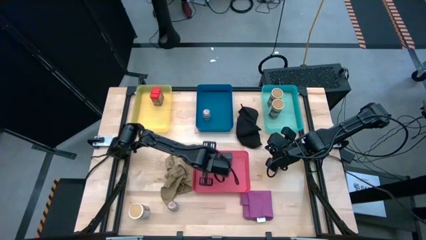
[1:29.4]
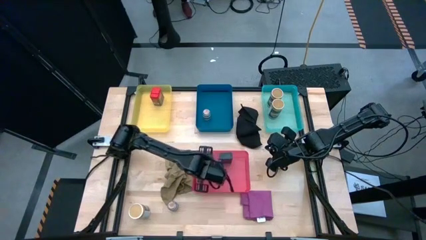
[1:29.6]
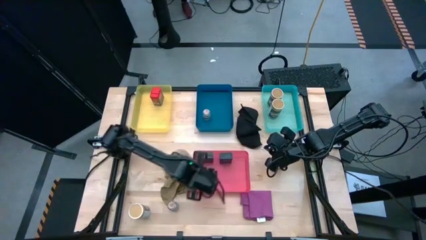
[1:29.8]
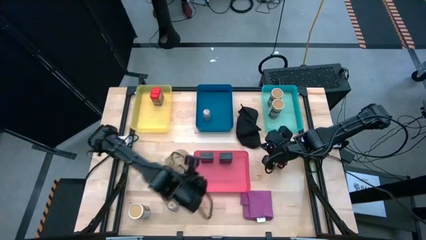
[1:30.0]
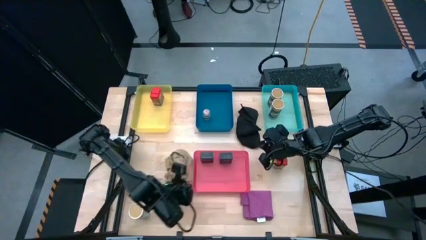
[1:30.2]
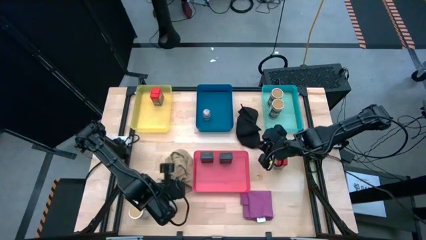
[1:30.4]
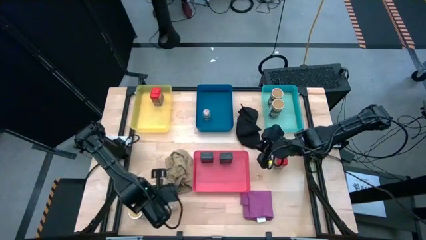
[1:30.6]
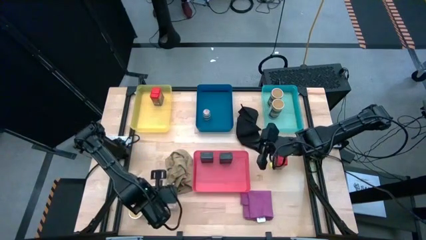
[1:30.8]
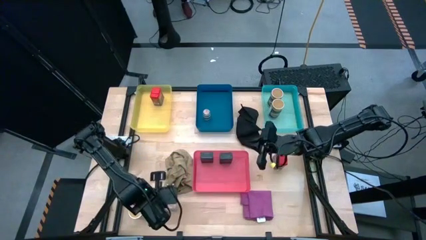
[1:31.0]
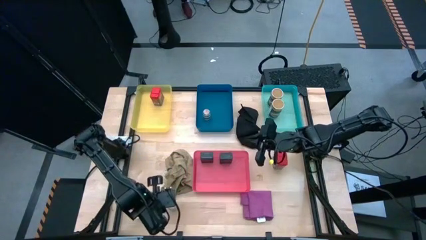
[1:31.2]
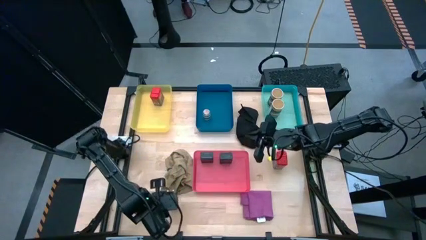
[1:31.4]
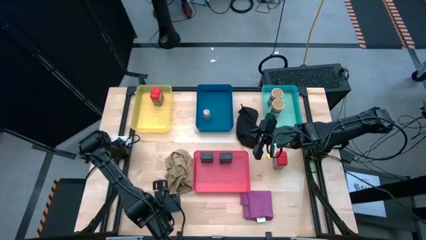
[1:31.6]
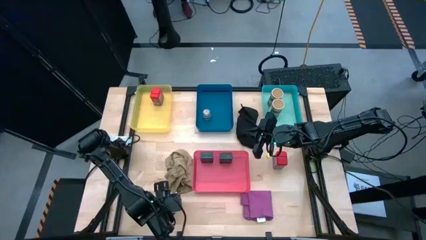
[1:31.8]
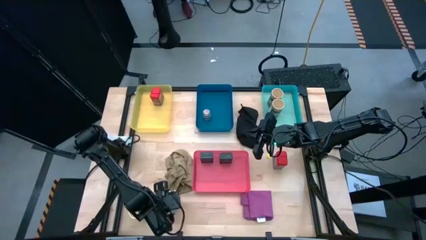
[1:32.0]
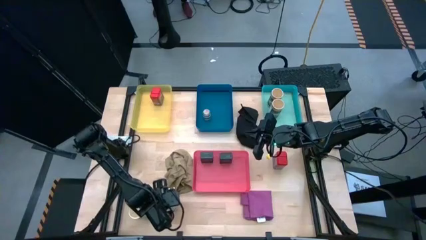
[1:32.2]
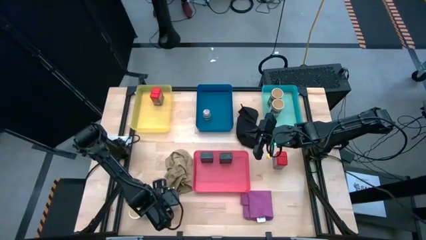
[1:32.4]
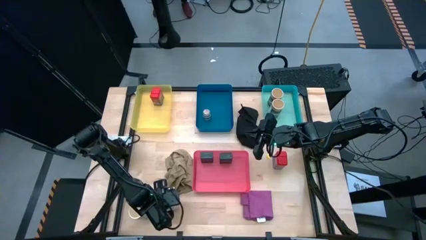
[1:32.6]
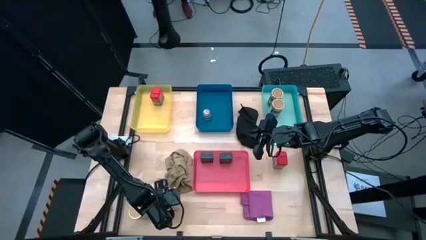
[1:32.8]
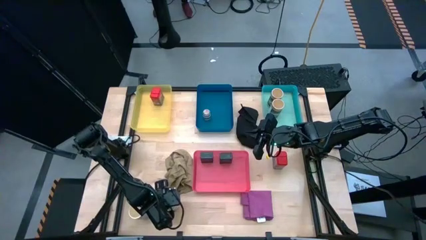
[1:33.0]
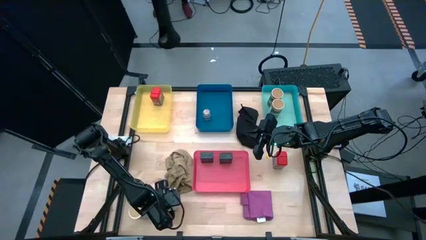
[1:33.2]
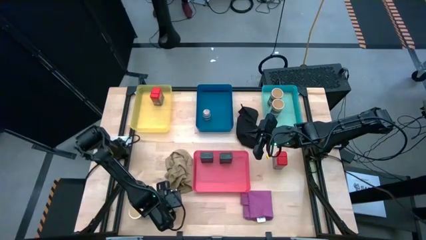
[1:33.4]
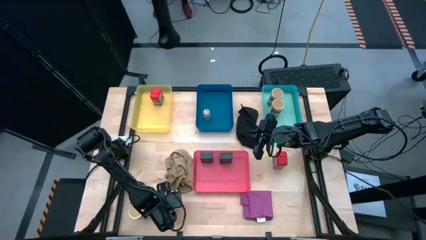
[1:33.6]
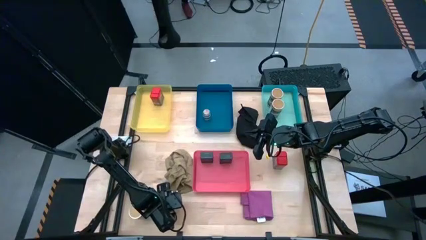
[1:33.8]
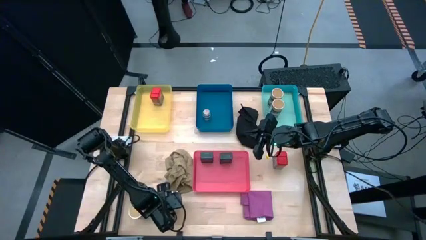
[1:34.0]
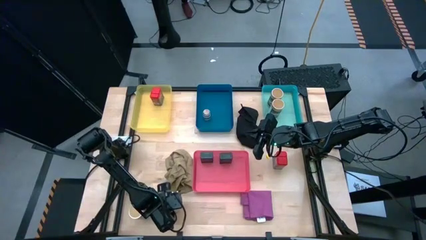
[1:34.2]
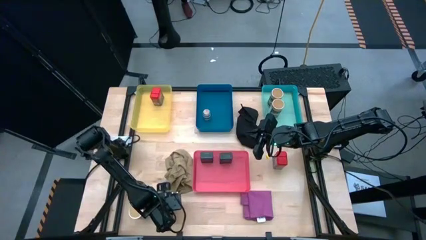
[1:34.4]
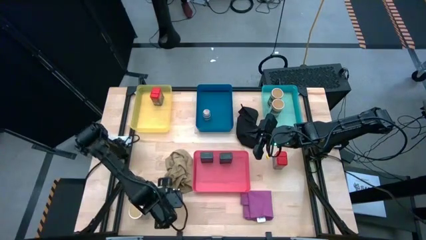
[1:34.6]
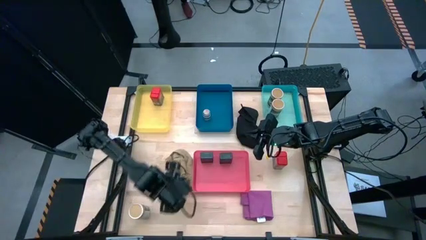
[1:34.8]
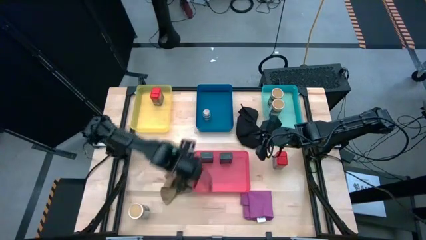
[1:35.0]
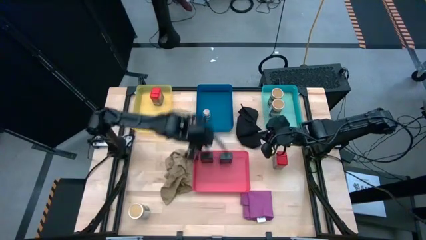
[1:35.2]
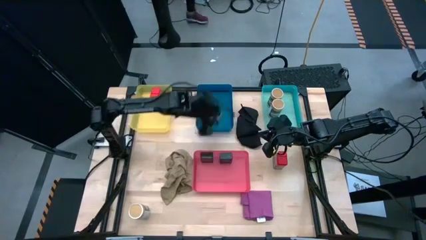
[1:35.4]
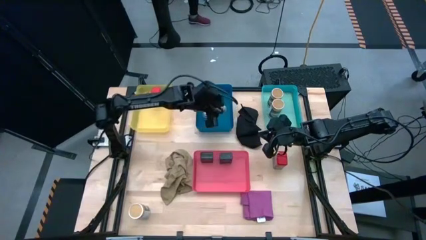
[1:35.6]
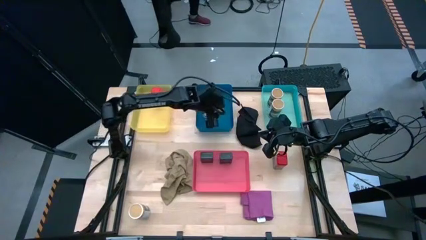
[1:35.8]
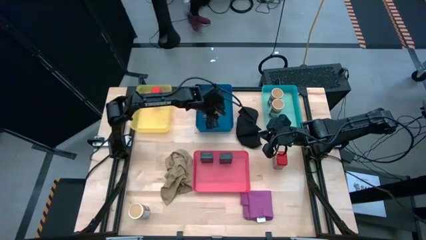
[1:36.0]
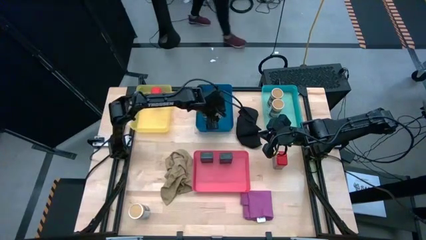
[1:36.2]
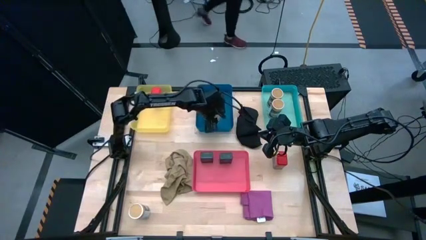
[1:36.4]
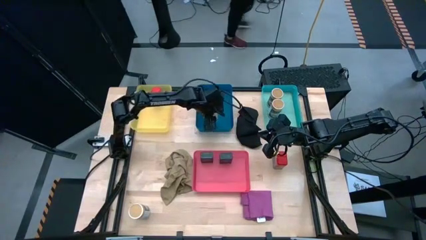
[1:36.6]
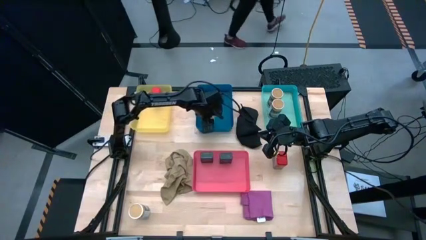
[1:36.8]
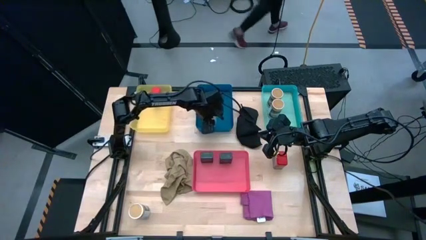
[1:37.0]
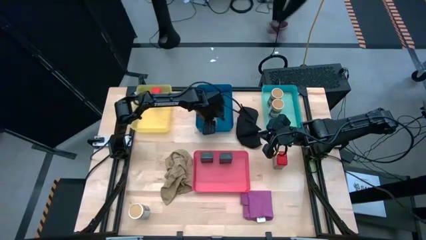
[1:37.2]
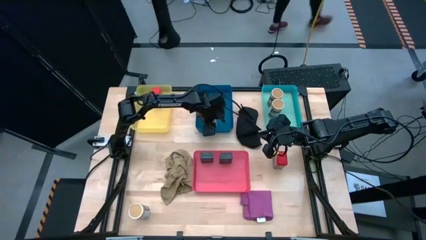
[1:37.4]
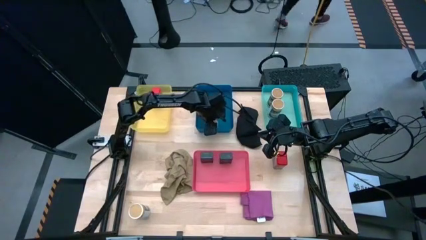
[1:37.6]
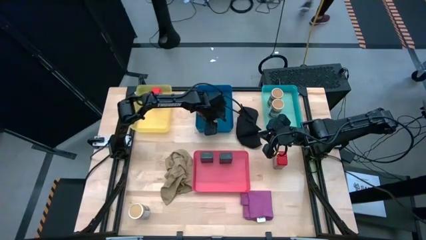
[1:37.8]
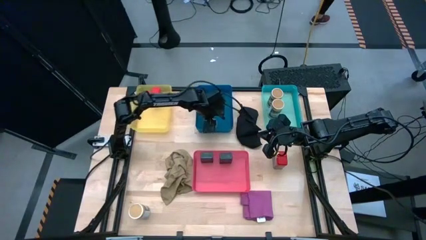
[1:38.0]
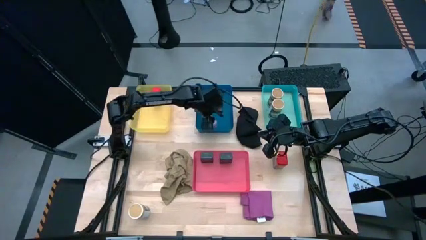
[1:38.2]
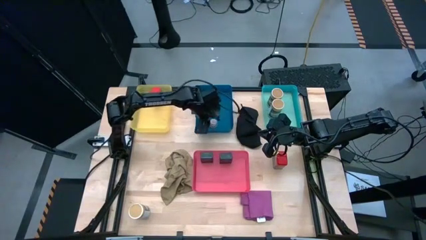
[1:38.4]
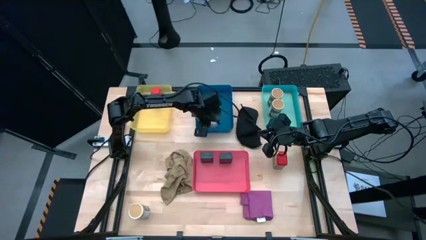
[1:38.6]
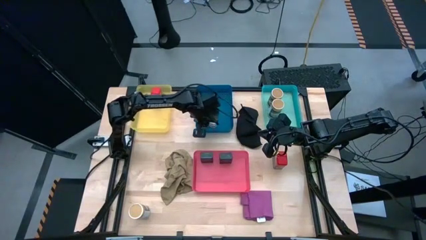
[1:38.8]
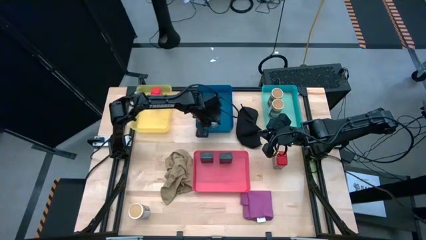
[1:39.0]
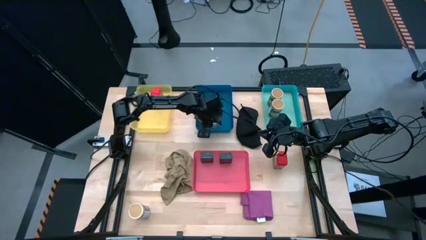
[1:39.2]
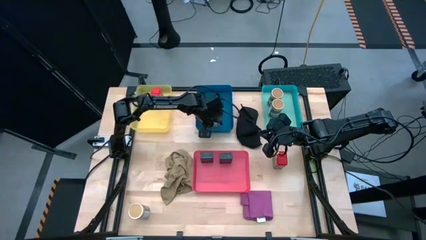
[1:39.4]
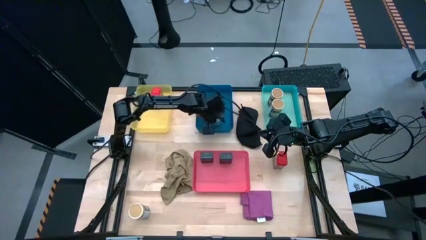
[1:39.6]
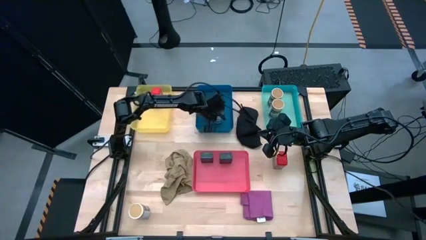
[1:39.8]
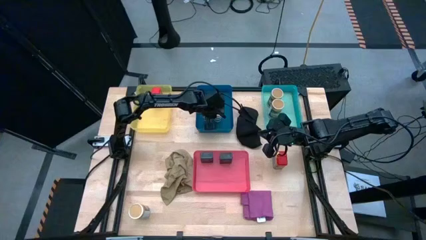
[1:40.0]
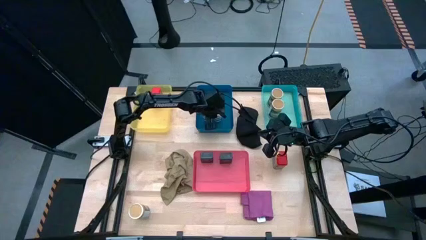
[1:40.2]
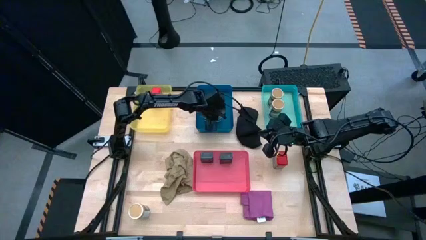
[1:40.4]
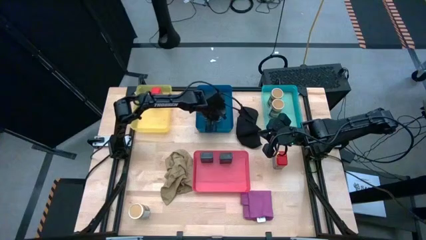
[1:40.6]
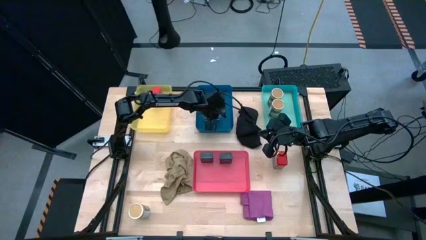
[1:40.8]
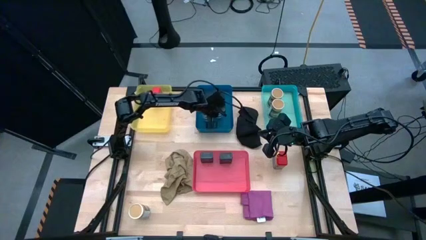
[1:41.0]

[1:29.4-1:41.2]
Task: Sort spices by type
Put the brown seasoning bottle into the blue bin

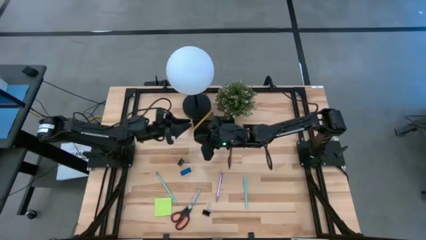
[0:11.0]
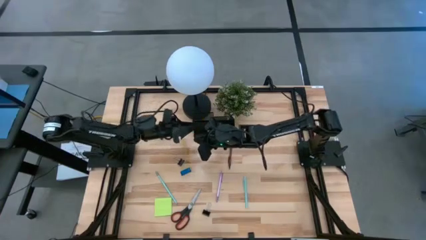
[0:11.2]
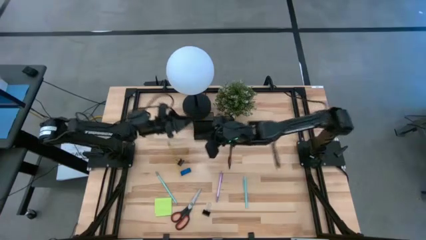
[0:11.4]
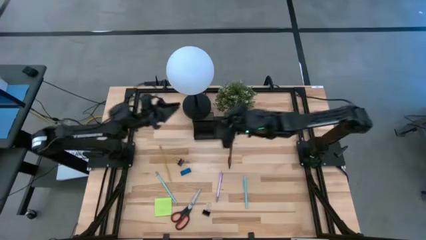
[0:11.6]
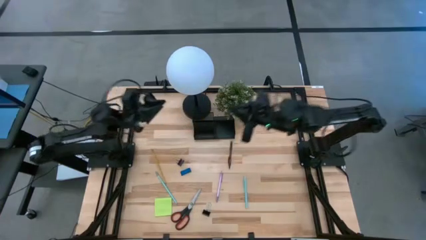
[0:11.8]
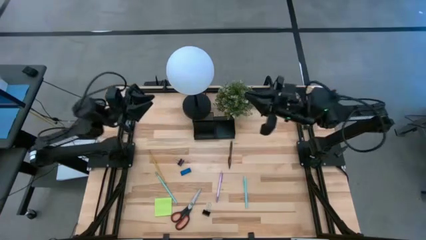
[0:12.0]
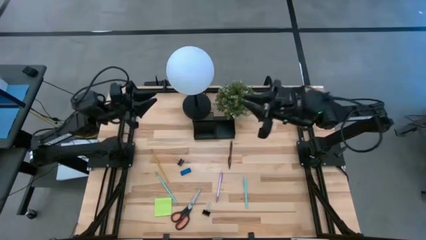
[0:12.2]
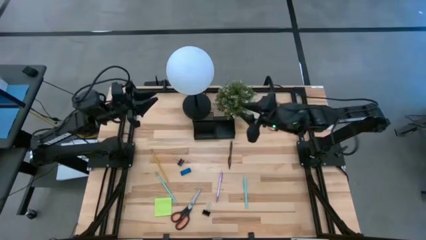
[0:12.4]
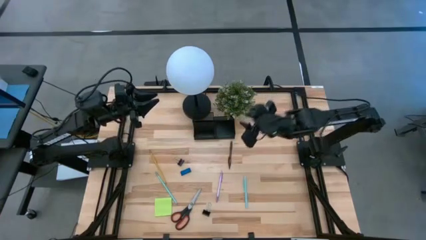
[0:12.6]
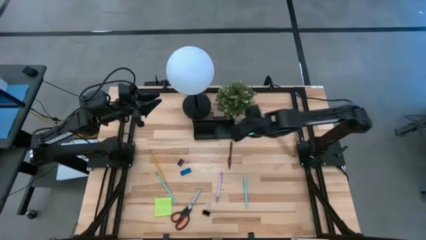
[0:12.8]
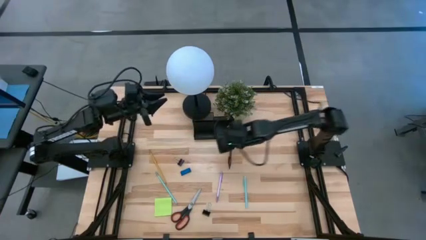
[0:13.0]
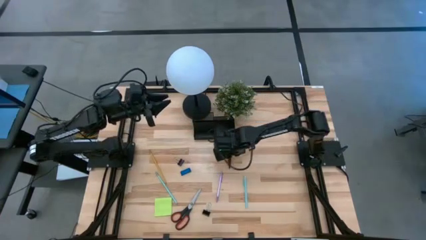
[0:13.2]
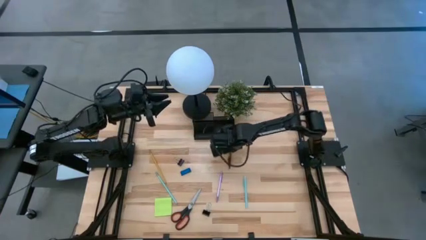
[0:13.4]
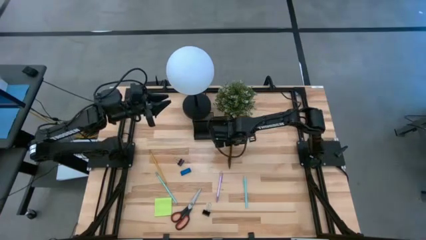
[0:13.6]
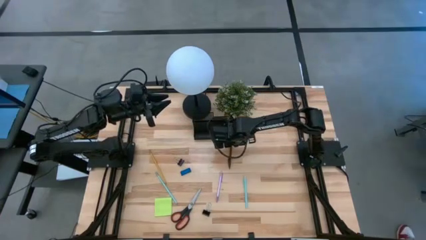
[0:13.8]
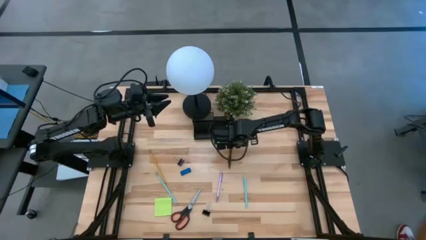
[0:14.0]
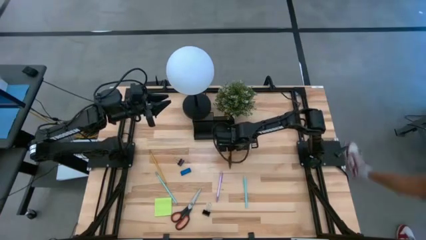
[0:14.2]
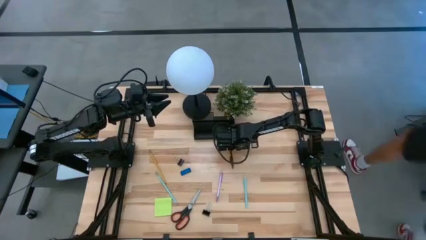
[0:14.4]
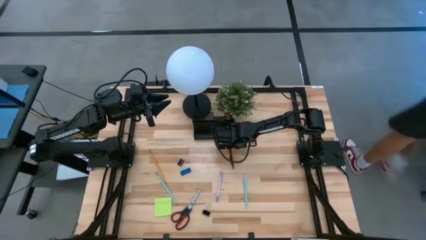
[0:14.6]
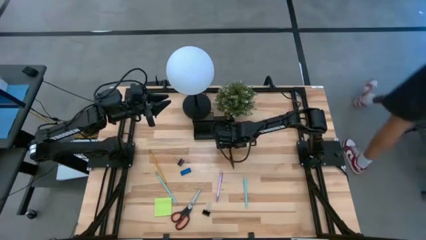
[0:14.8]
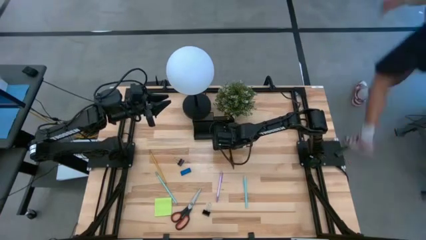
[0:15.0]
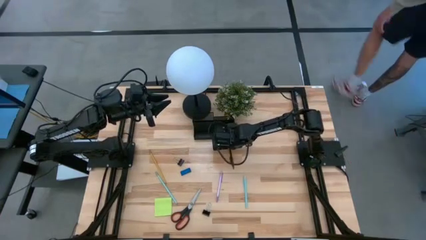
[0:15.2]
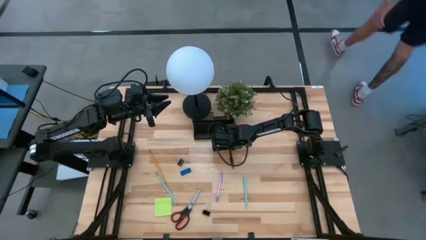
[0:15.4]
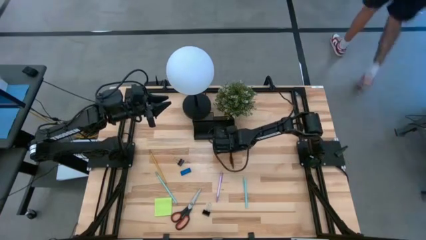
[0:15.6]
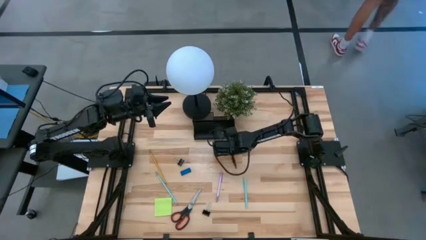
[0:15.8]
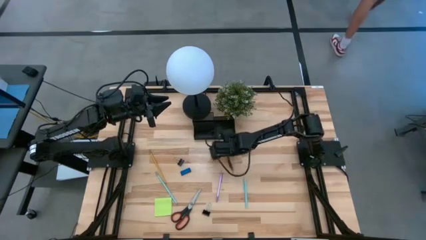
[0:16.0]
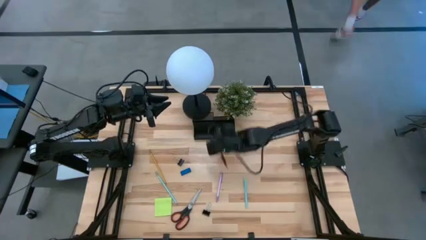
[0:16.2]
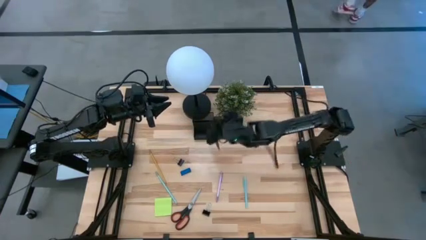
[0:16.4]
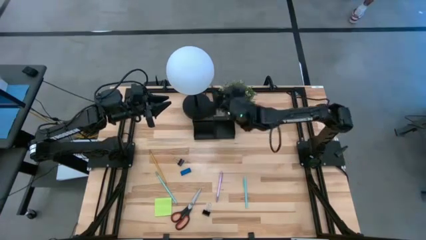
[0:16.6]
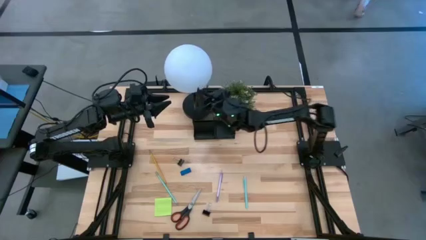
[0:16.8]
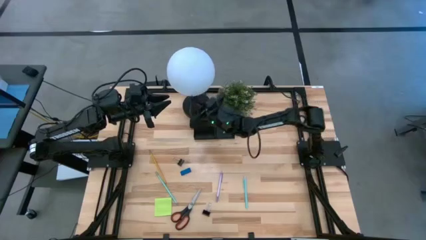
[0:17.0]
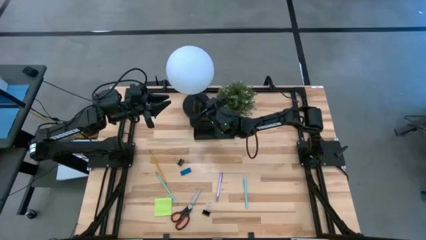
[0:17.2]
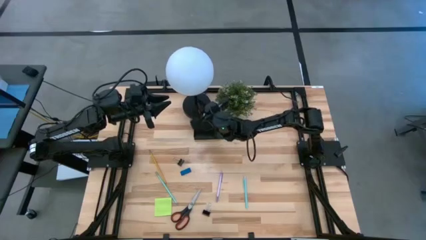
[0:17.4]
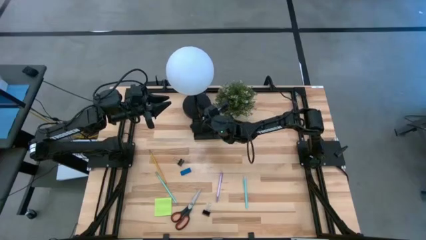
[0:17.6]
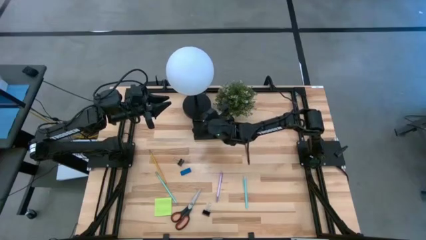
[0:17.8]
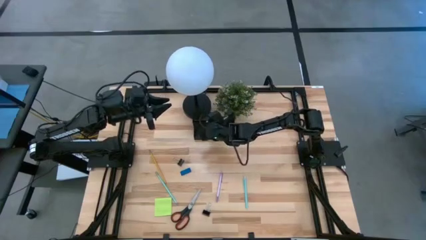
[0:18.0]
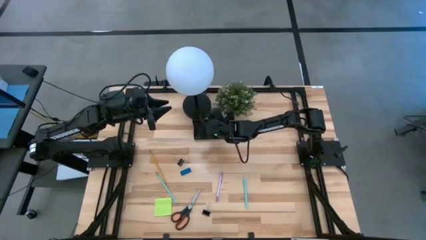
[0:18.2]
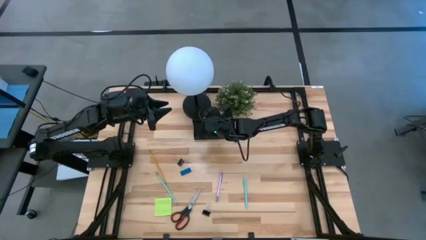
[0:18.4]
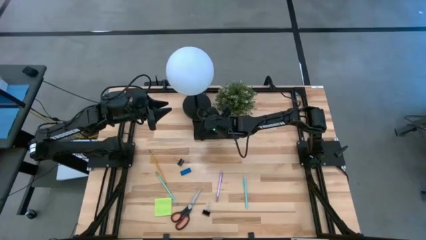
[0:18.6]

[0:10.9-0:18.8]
Task: Pick and place office supplies into organizer
Put the brown pen into the black desk organizer
